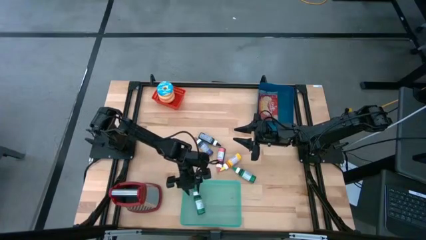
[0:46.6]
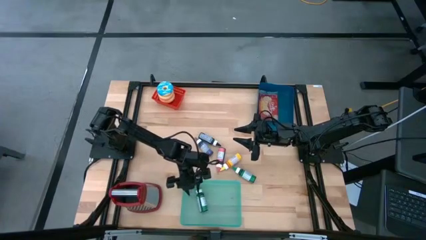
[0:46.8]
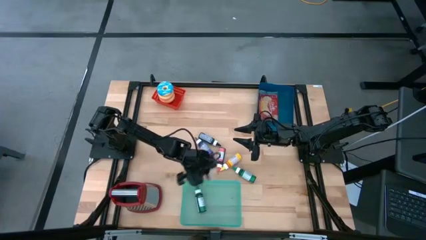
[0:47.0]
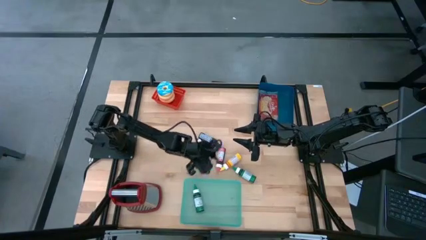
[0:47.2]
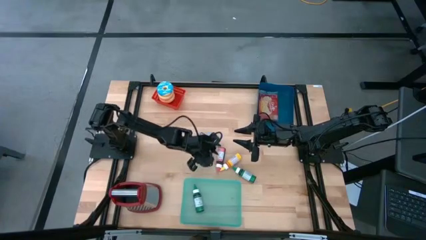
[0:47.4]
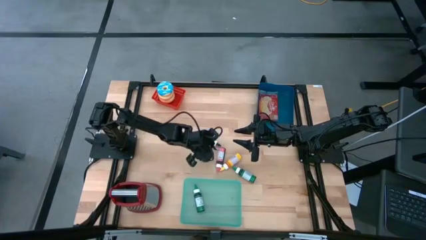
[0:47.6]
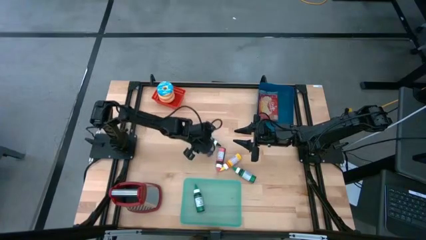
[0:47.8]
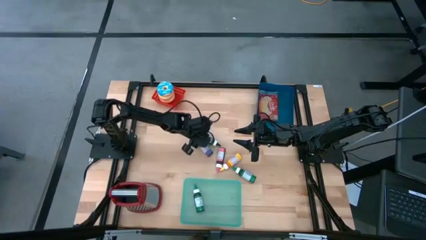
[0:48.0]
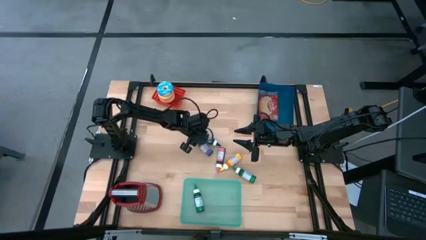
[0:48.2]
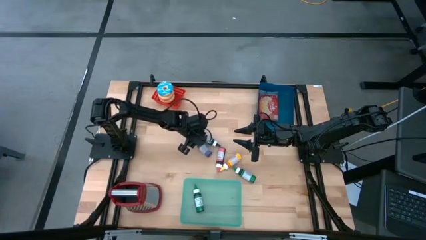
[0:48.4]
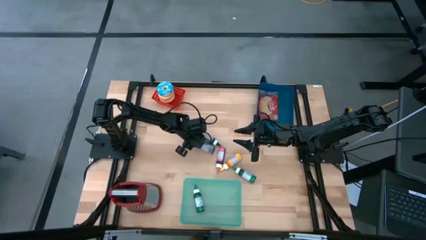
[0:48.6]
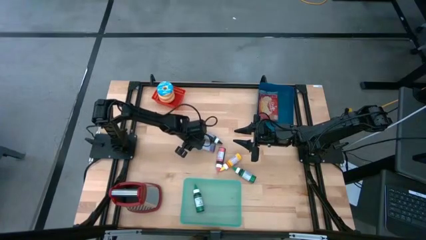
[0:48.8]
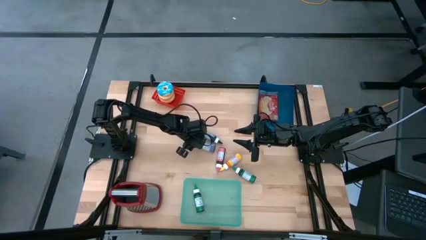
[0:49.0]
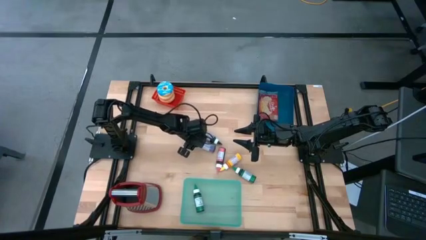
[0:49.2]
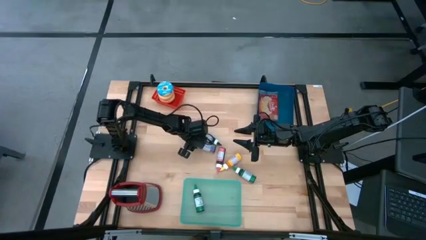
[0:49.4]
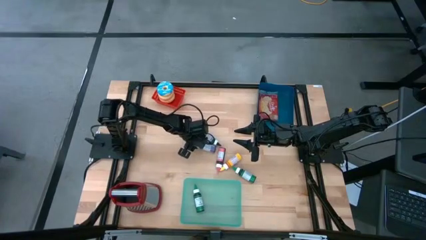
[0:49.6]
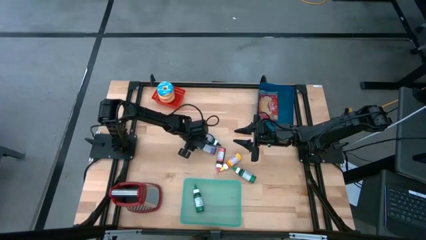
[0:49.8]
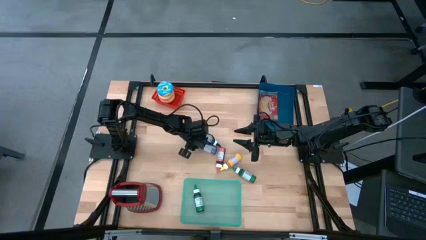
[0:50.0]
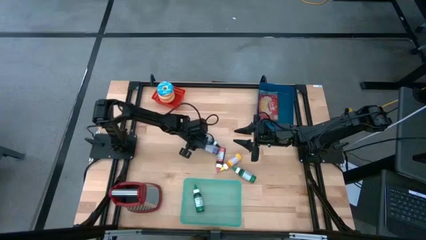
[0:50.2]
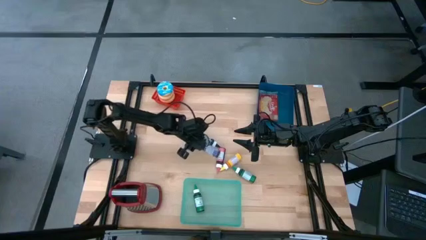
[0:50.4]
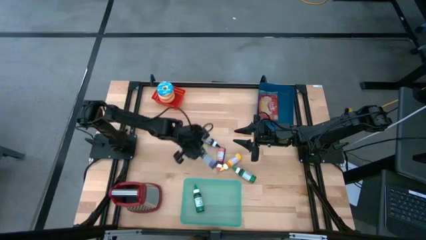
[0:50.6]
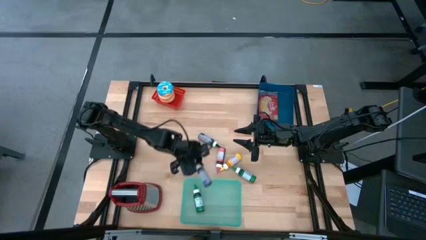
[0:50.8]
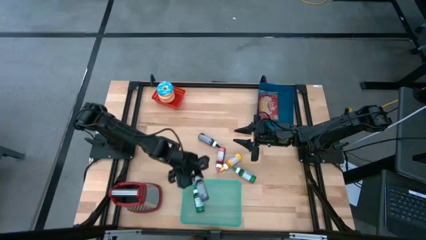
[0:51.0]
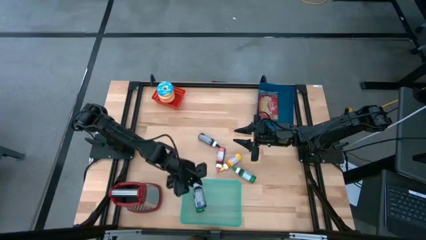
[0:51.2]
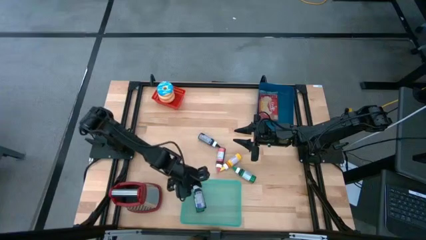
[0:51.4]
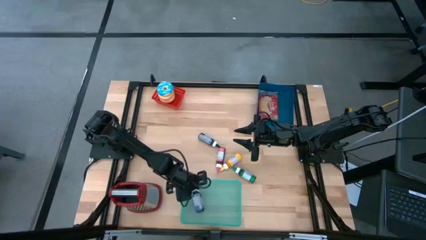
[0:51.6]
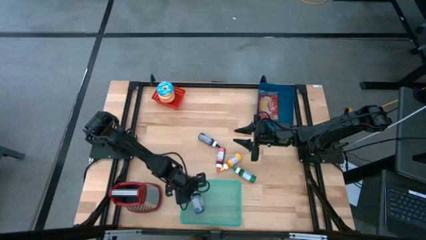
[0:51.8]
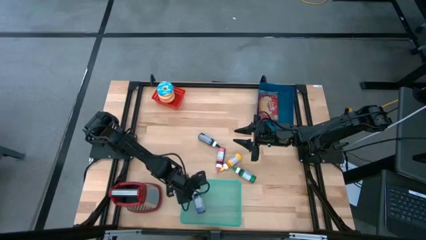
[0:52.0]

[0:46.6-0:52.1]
Put the violet food coloring bottle into the green bin

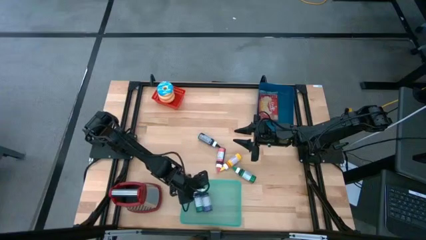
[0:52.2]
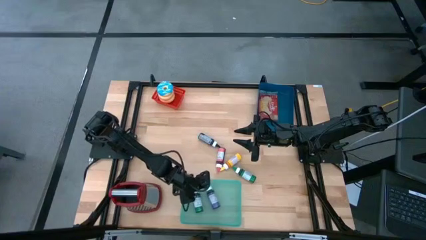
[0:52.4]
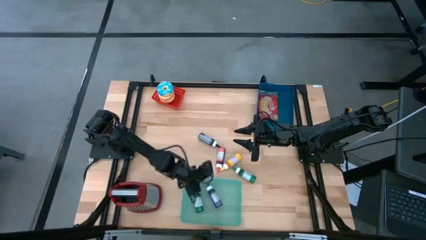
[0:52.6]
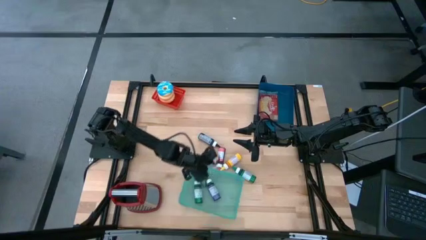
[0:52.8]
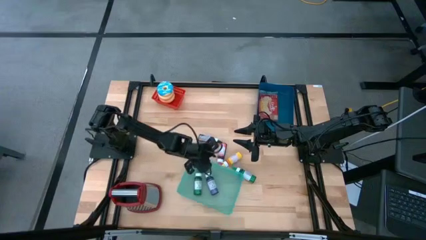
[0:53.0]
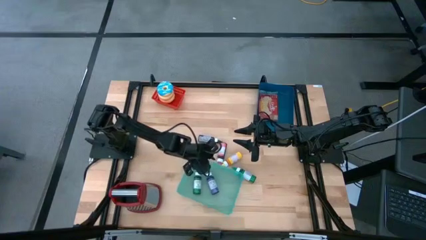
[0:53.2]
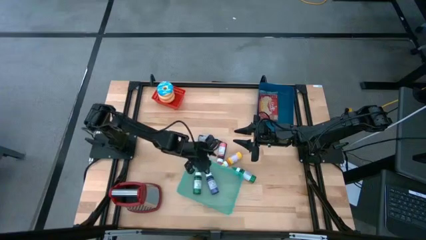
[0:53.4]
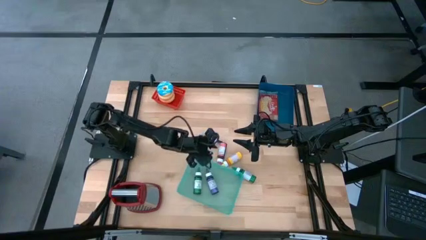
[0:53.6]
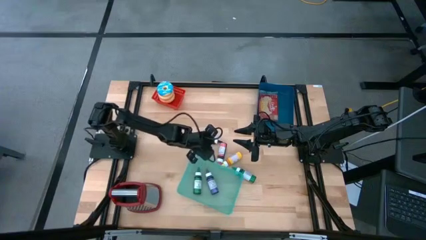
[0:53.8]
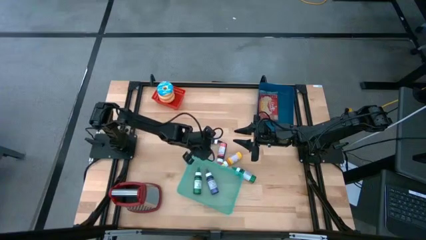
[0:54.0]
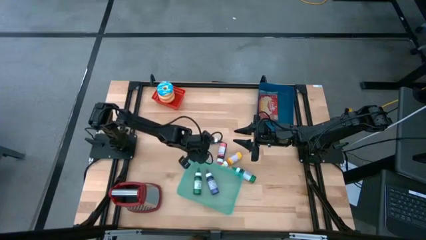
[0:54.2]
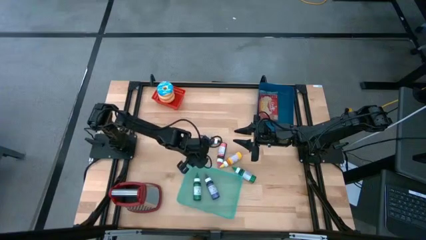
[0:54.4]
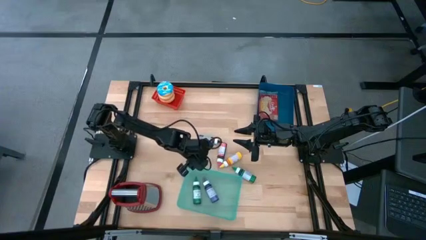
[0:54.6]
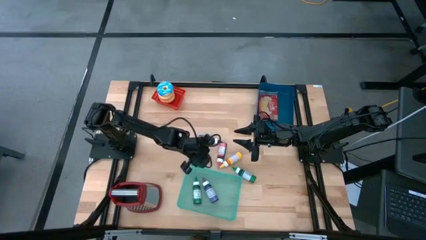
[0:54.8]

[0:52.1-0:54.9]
Adjust the green bin

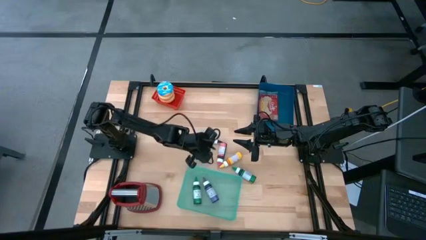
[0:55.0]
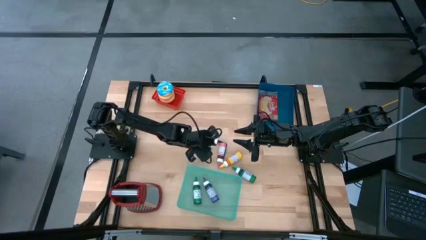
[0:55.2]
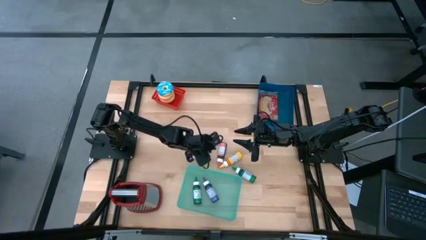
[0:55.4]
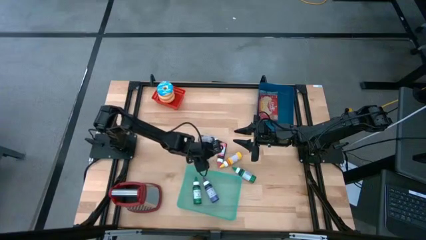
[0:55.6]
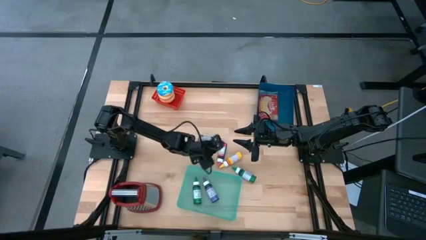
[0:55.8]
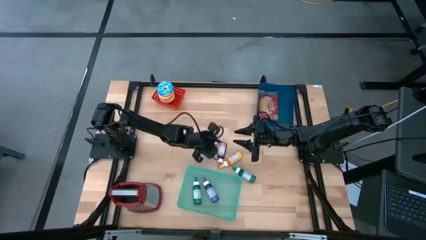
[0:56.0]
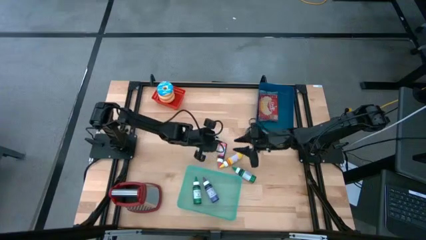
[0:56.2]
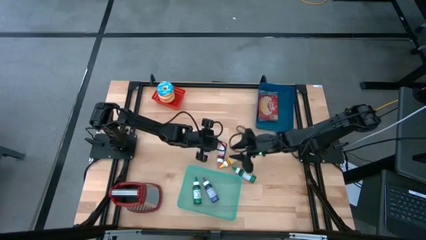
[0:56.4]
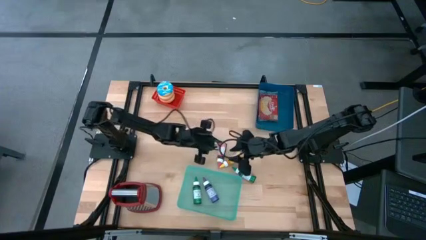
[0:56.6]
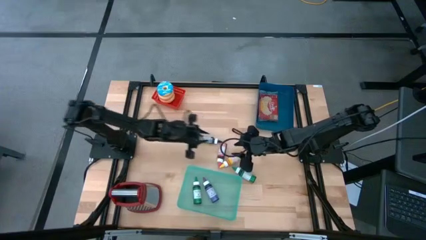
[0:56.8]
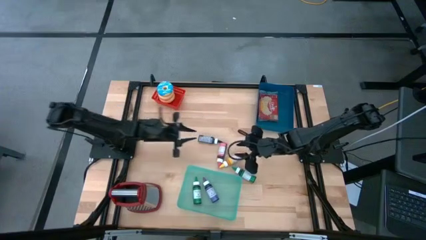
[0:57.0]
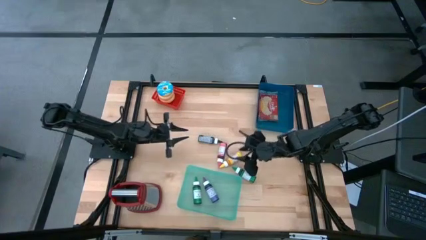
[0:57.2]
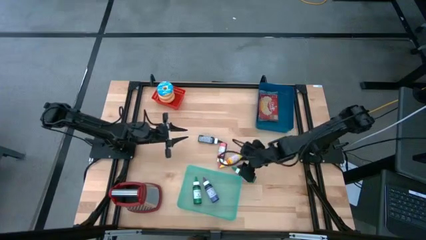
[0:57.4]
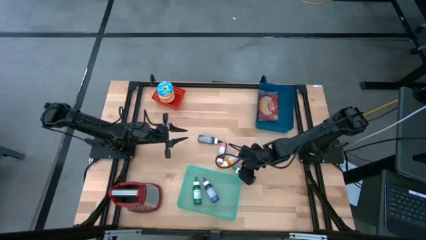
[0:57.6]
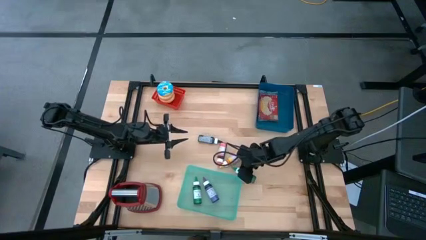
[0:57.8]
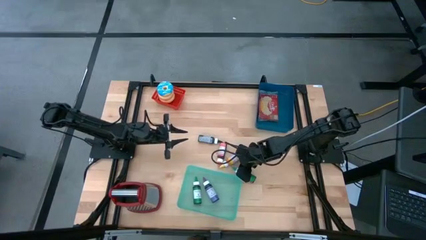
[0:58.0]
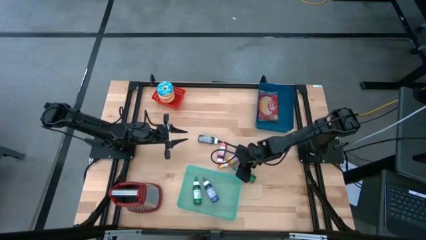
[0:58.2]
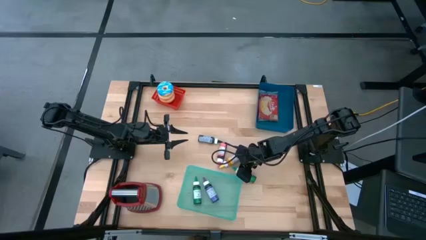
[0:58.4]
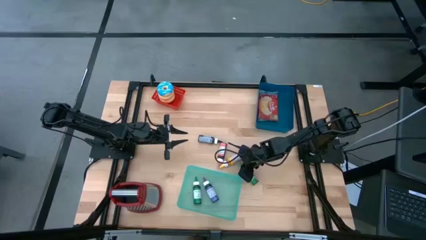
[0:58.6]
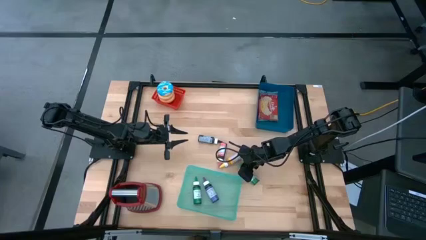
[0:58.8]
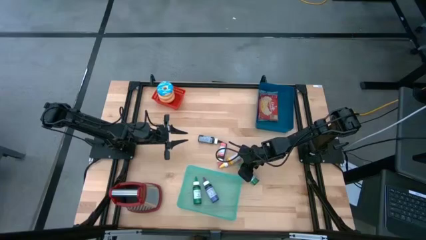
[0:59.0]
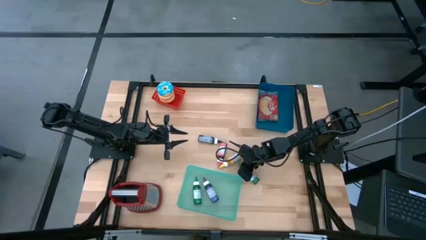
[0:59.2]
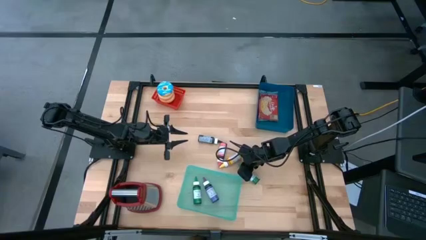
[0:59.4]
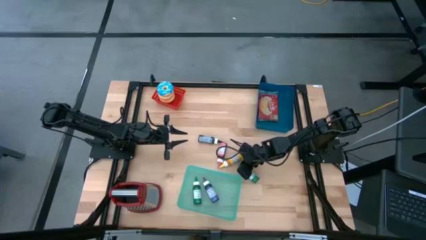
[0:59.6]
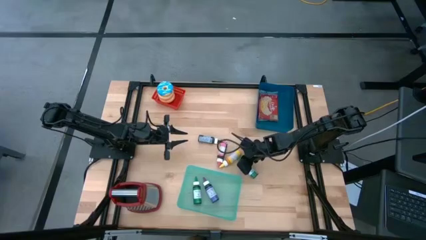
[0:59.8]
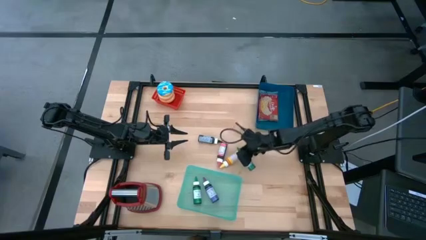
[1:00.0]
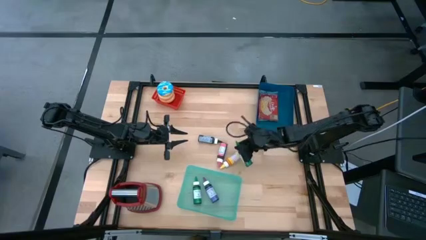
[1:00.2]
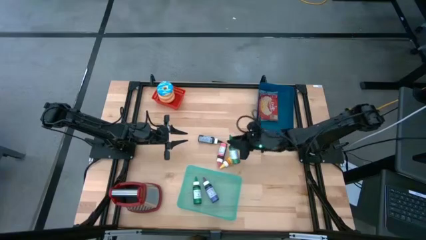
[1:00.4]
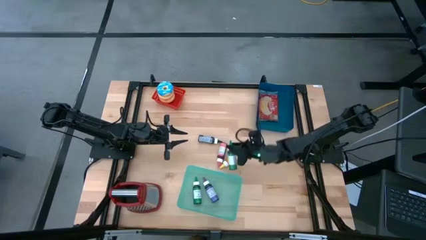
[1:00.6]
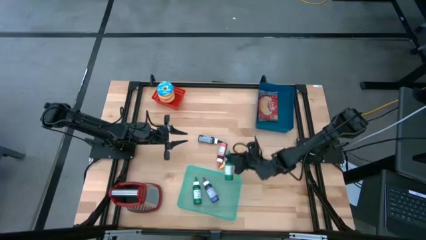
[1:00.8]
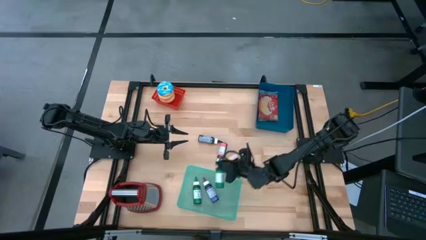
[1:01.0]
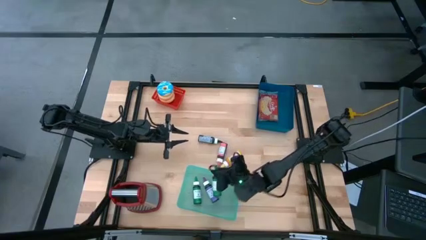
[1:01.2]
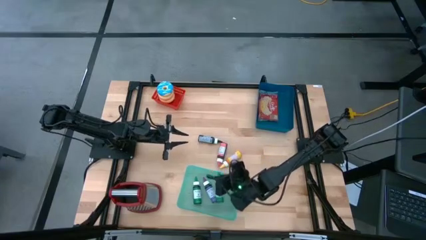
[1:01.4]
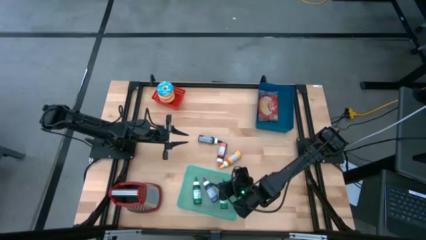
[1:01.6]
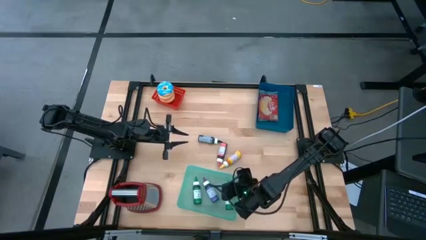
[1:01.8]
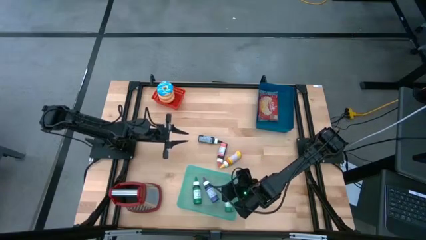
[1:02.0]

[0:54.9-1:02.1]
Put the green food coloring bottle into the green bin
